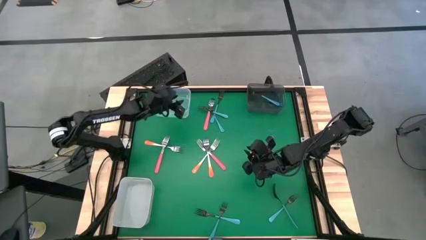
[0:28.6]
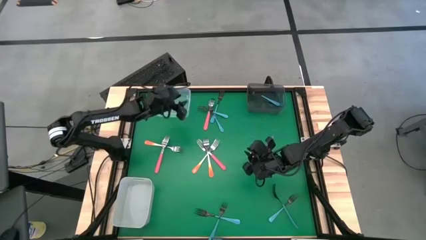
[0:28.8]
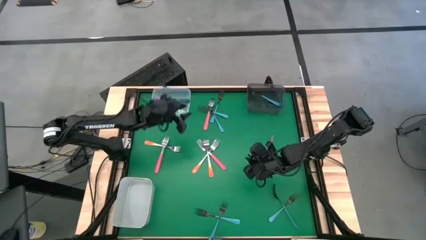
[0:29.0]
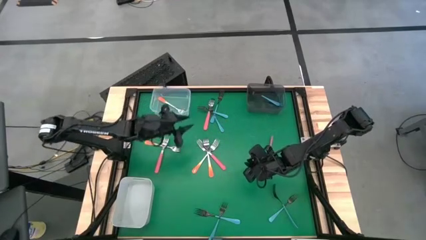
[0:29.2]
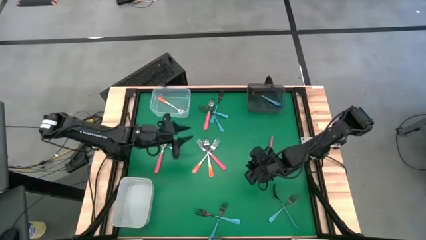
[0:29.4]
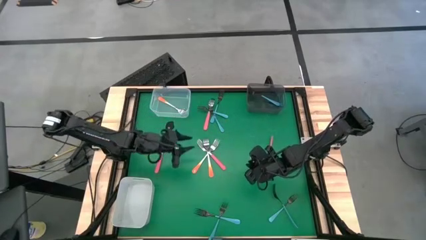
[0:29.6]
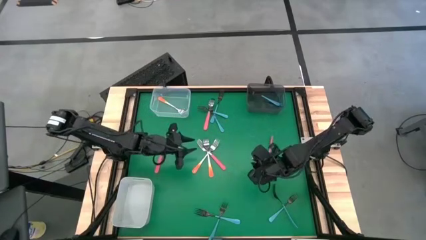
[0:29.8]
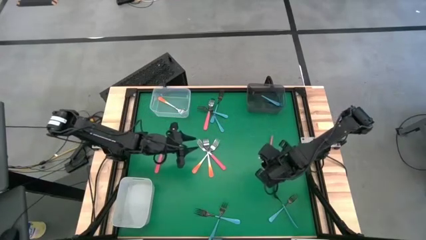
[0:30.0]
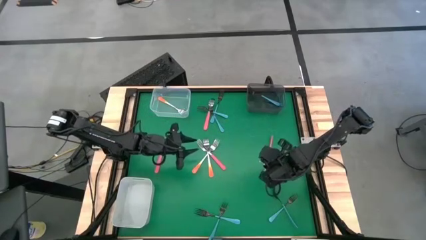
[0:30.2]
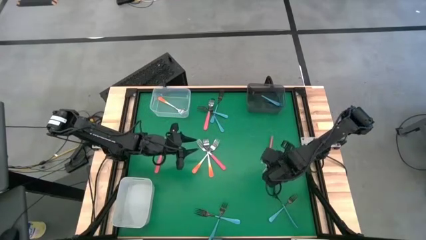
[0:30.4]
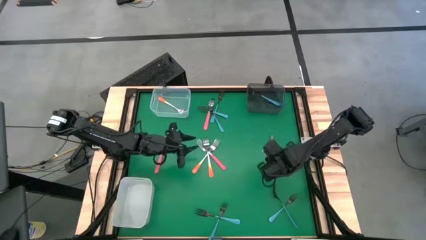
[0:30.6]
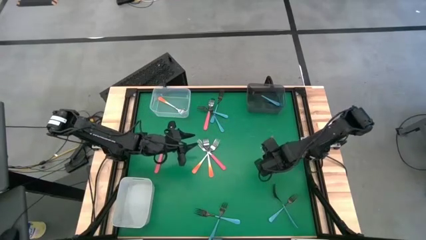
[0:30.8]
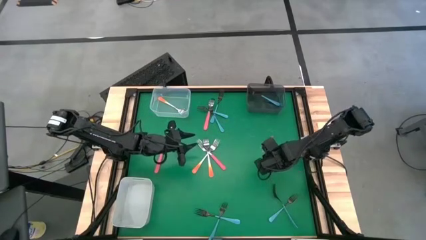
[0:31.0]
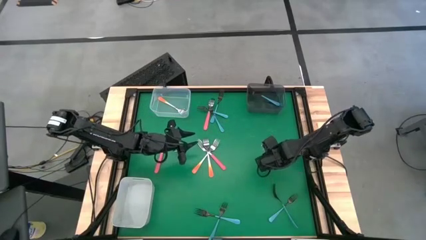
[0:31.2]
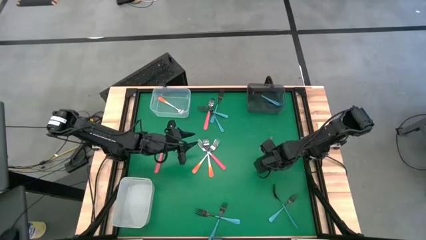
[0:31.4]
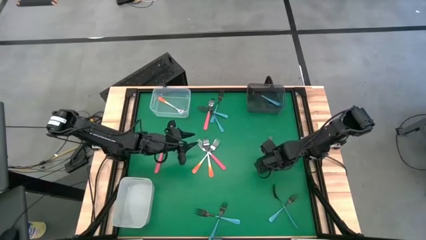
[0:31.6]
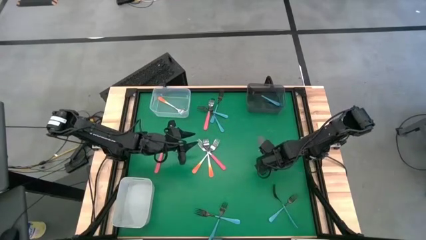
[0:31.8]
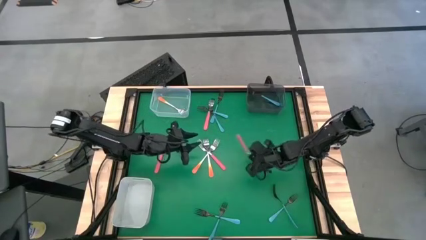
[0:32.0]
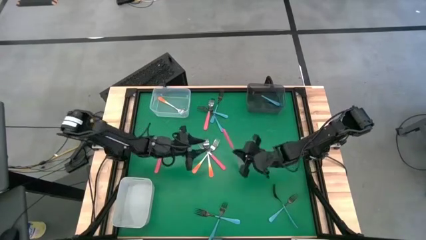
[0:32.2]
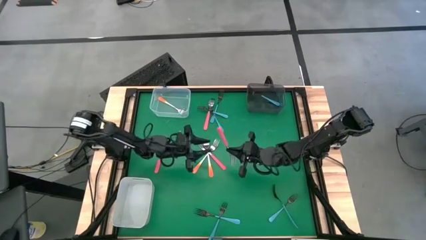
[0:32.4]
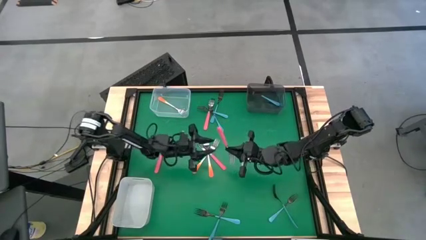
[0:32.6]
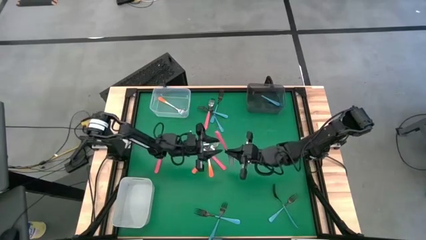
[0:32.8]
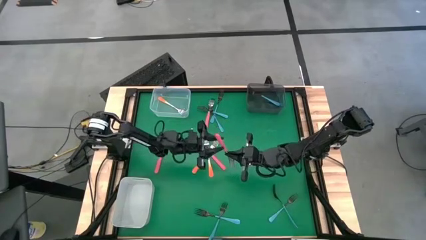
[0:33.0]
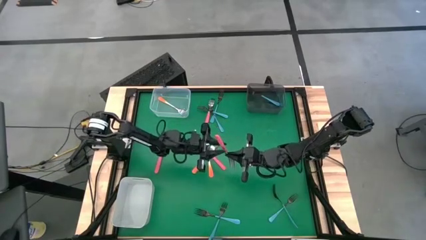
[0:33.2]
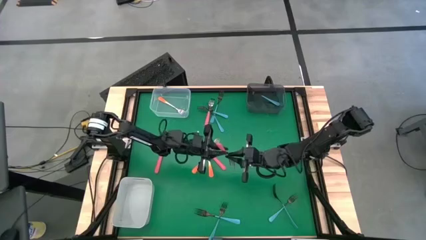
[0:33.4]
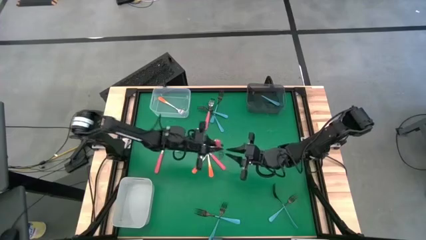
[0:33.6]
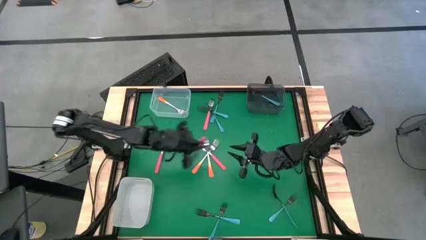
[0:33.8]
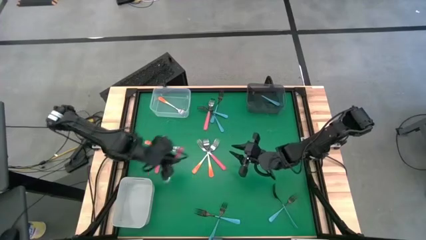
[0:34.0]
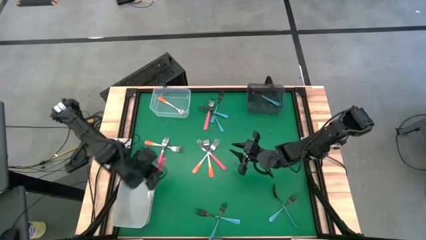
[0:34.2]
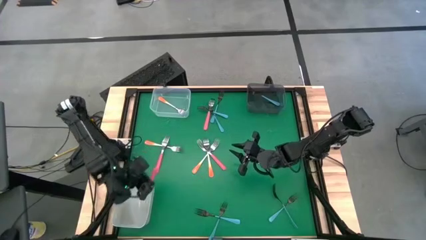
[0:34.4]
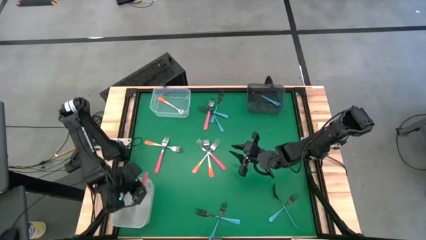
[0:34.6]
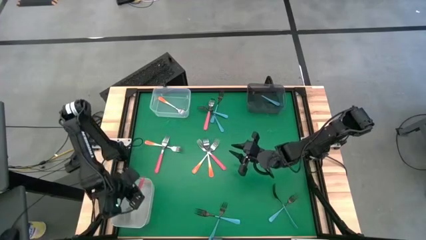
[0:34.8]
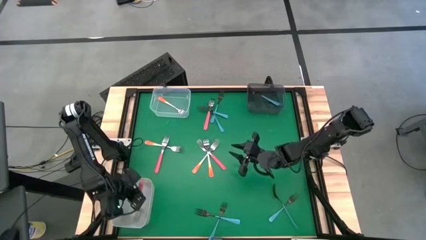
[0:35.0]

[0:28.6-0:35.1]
Task: Sort silverware by color (type)
Put the pink fork into the white bin

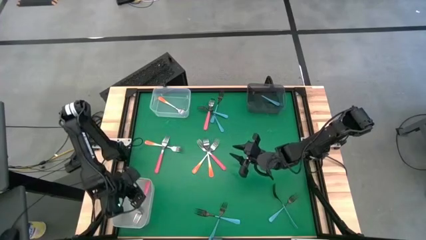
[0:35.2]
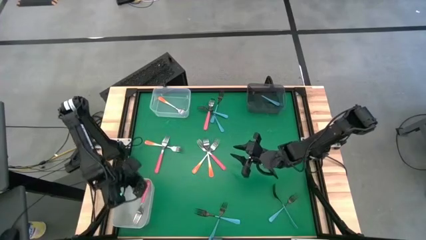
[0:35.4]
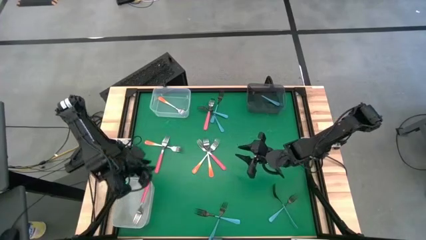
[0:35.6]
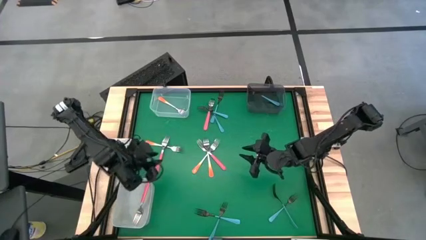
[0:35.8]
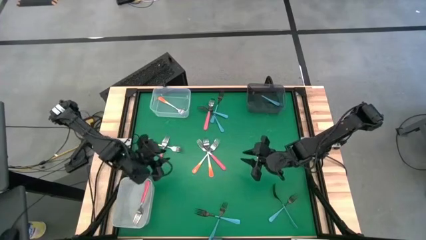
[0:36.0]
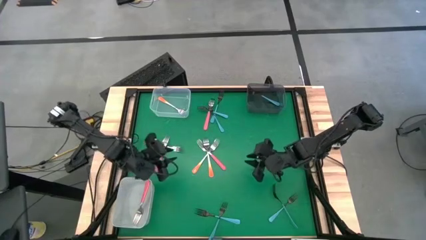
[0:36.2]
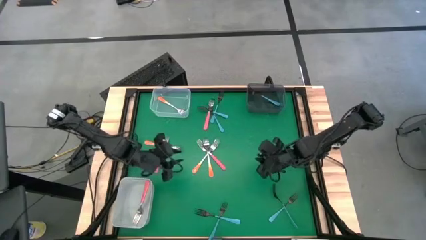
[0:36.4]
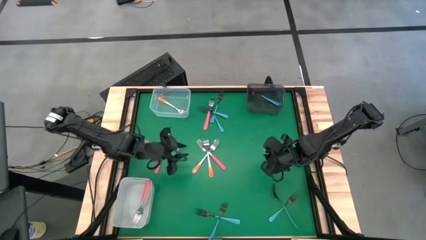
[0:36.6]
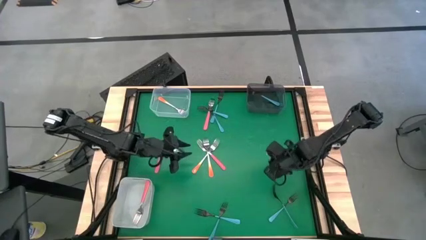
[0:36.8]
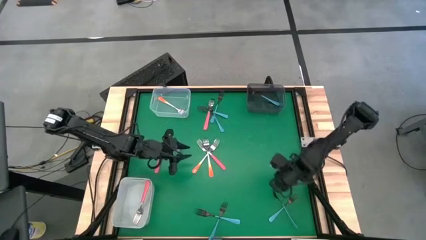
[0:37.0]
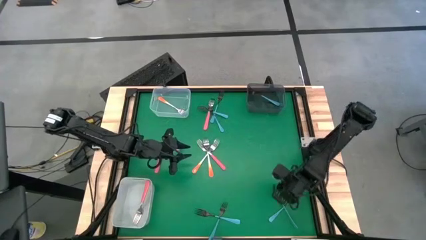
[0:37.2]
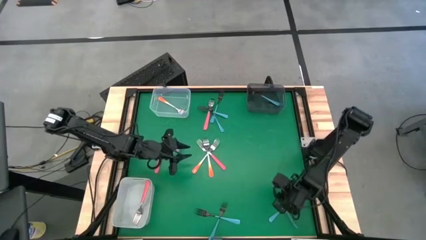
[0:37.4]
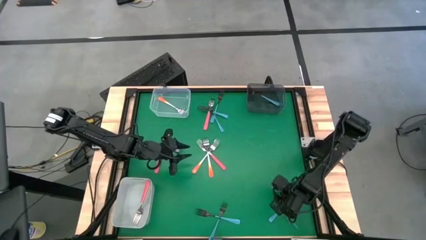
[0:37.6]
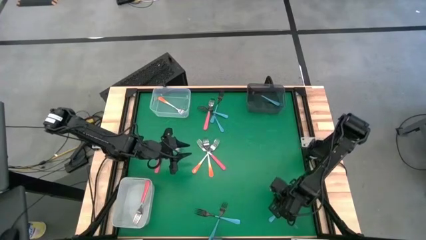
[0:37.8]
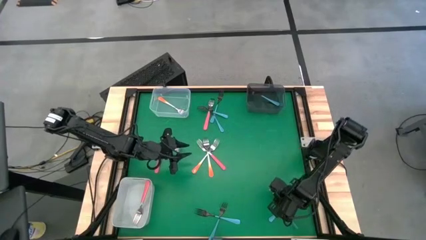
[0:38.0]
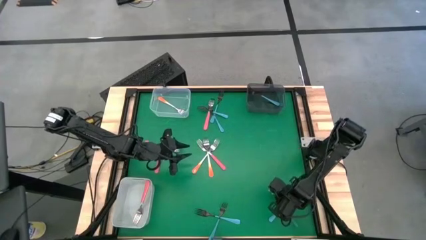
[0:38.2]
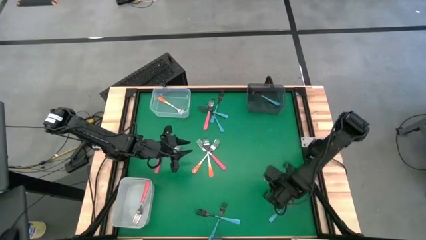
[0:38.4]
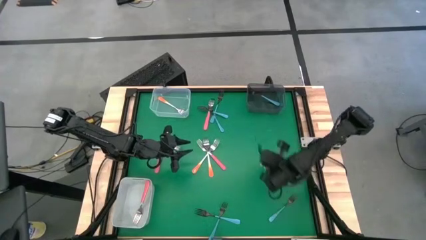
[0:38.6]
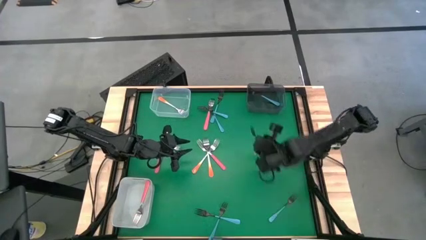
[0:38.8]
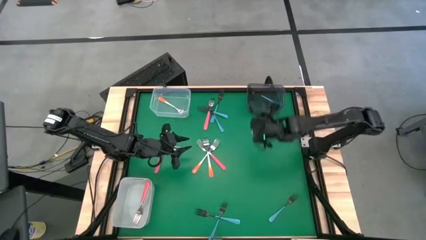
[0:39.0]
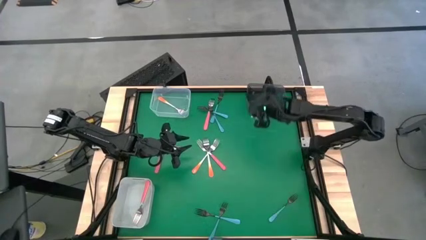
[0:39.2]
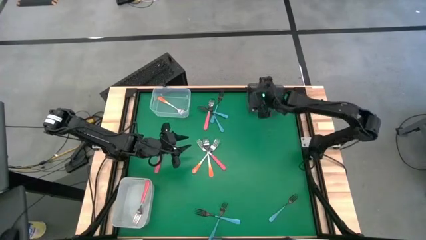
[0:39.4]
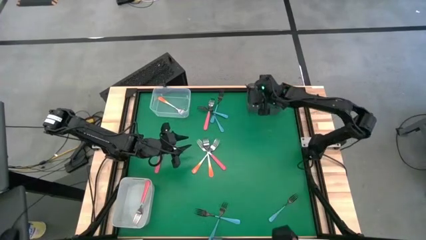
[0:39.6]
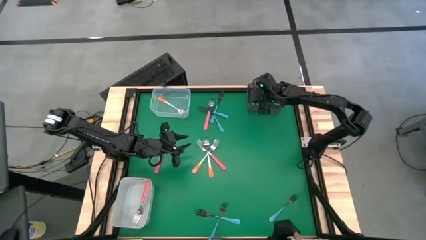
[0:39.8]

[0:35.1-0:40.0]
Put the blue fork into the black bin

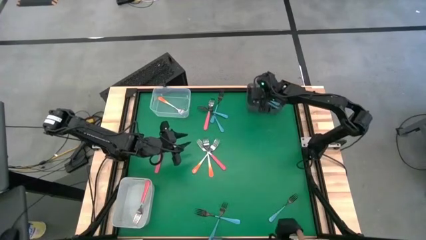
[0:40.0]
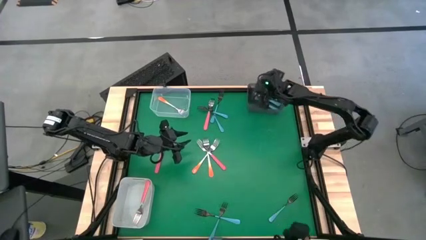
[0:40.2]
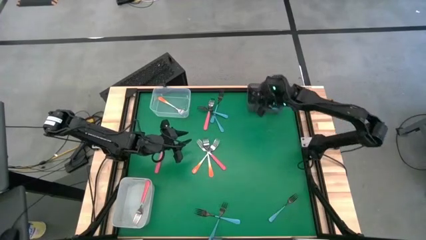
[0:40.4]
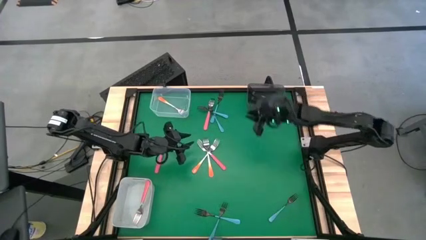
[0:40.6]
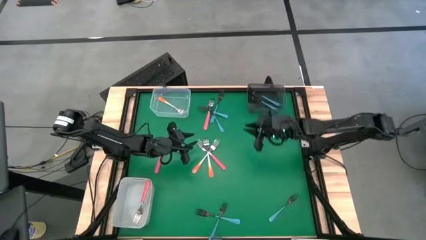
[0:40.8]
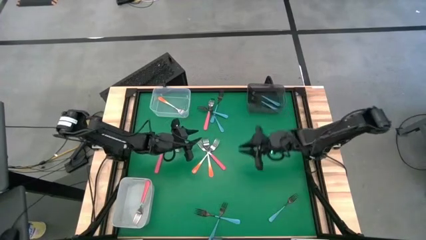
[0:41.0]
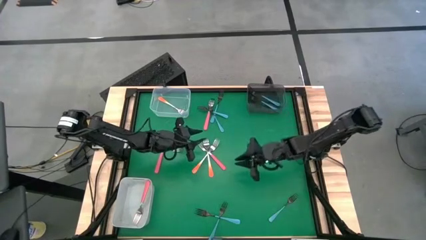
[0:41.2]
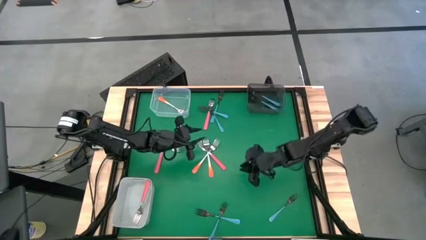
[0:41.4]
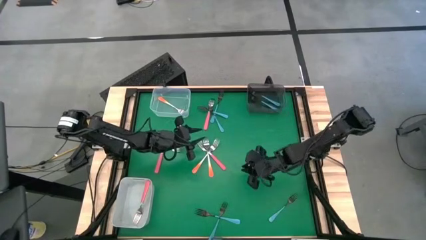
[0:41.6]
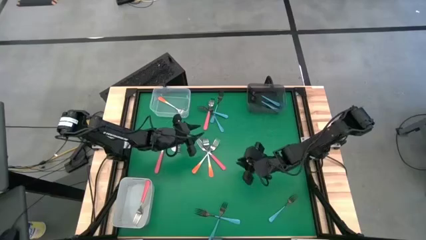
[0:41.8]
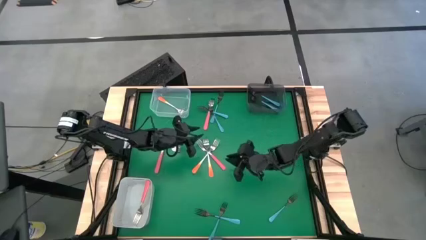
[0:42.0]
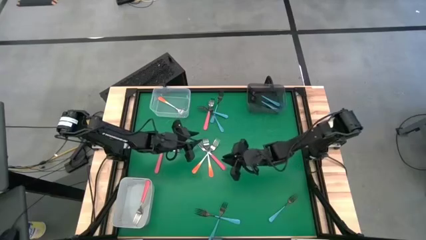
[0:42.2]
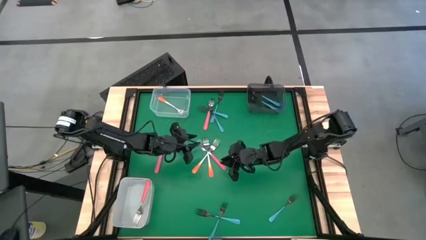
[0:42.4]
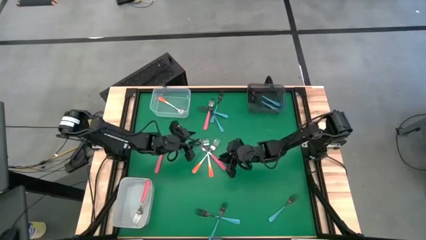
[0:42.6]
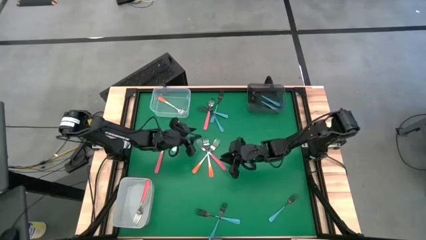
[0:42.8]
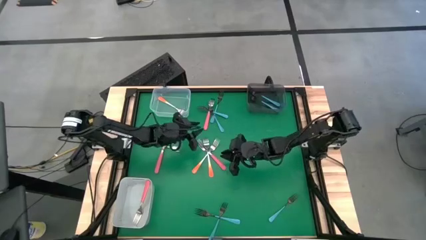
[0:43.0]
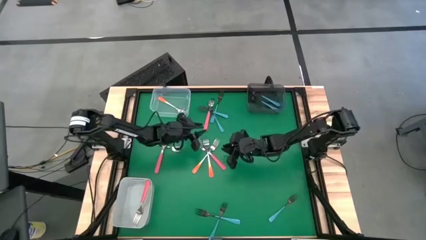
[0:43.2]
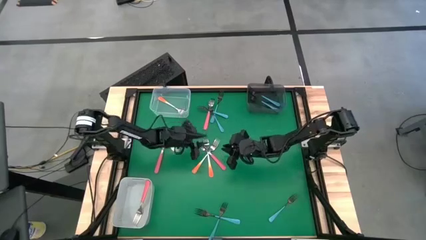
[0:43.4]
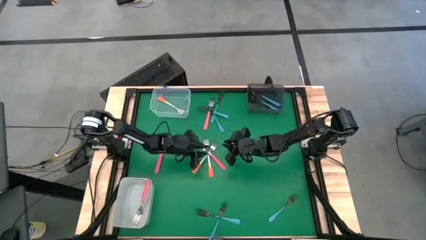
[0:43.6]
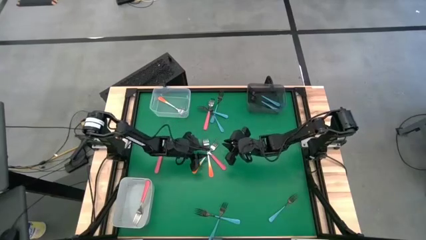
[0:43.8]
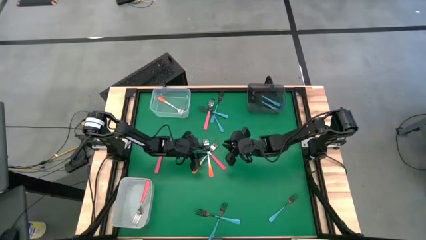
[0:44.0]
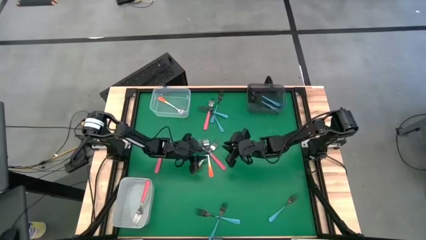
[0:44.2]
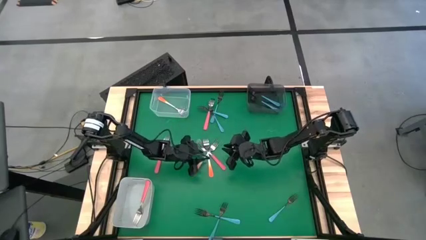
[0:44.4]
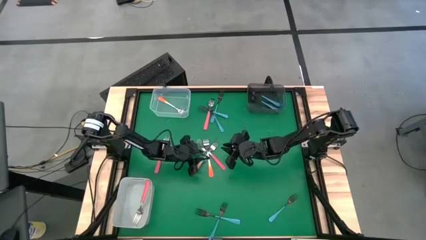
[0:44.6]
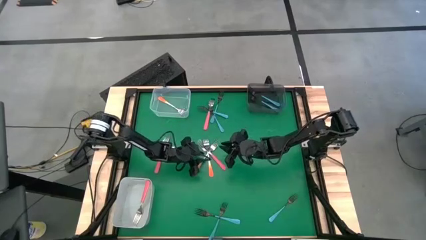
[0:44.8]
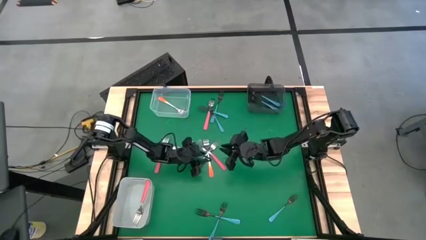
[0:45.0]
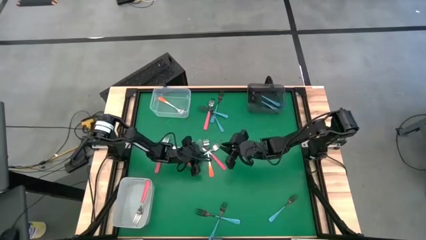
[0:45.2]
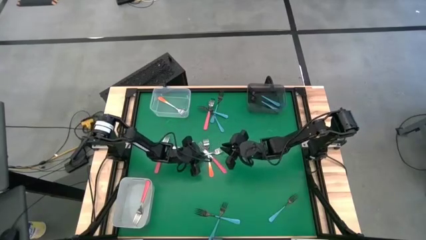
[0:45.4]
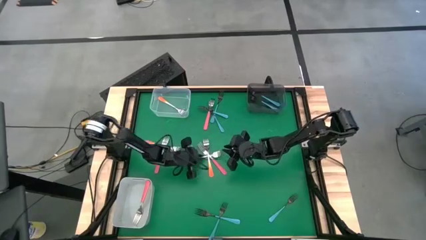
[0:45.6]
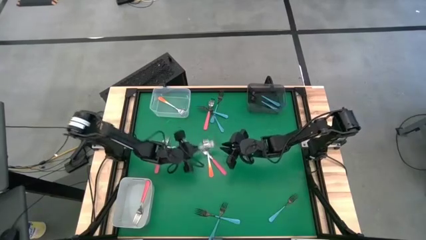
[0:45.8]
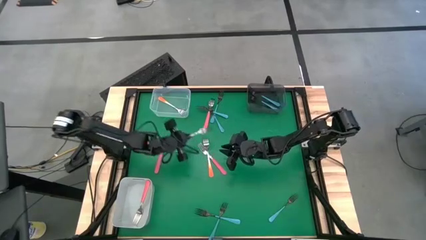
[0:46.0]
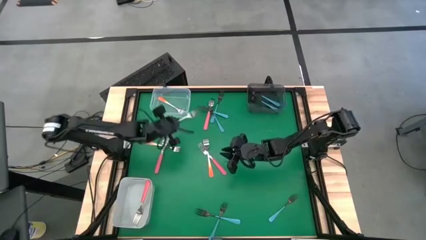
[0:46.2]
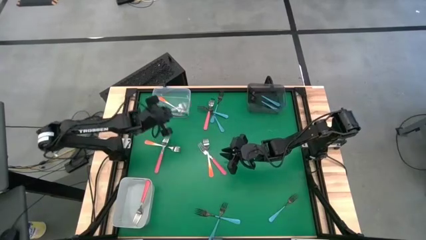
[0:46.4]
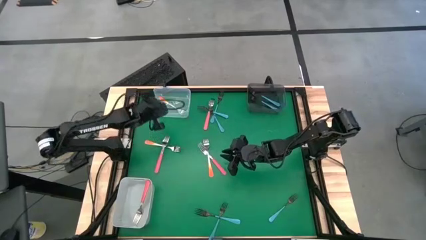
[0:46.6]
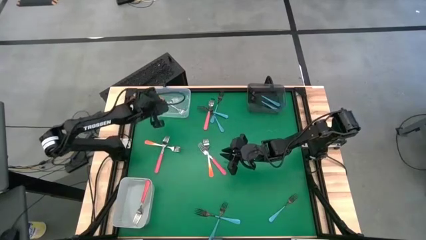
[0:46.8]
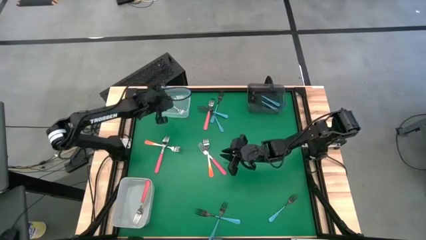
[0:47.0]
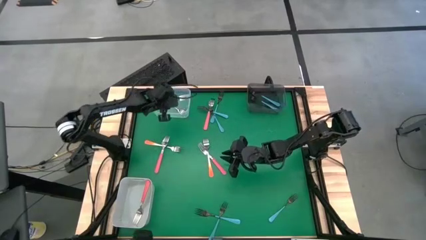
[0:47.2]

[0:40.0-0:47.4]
Put the orange fork into the transparent bin
